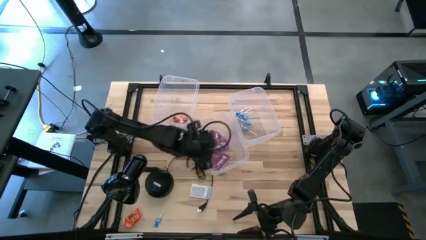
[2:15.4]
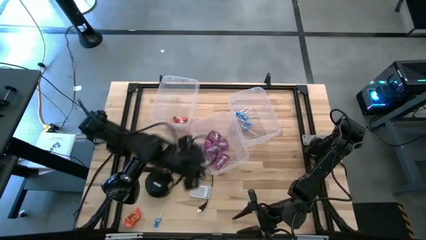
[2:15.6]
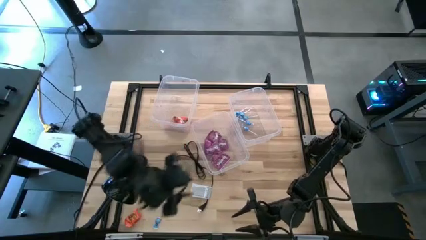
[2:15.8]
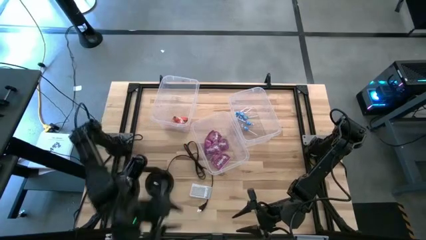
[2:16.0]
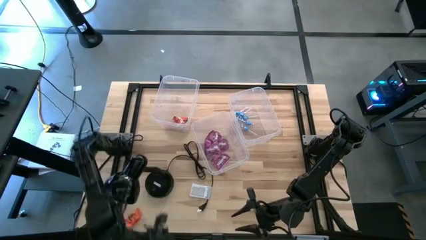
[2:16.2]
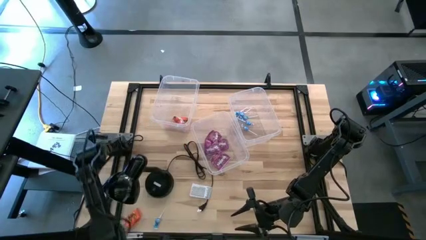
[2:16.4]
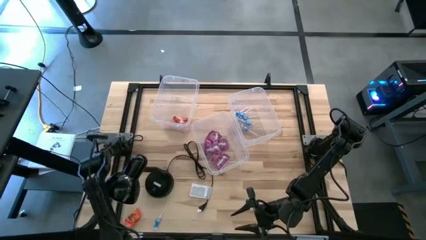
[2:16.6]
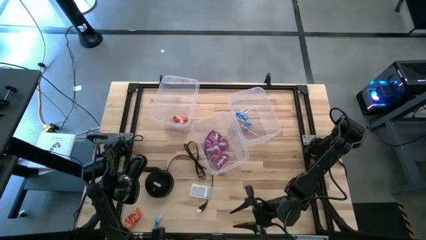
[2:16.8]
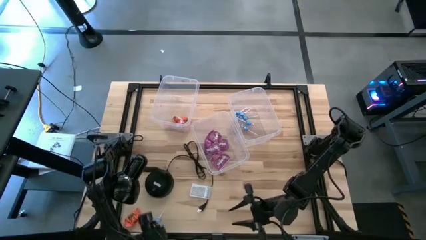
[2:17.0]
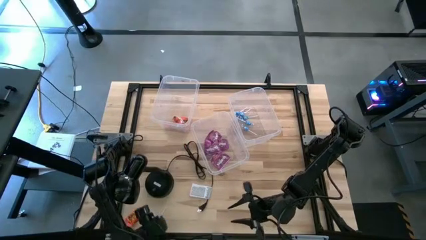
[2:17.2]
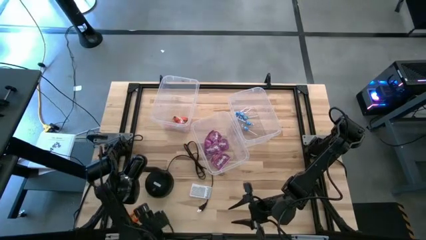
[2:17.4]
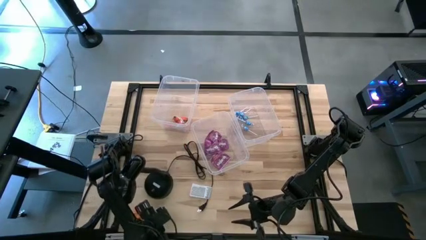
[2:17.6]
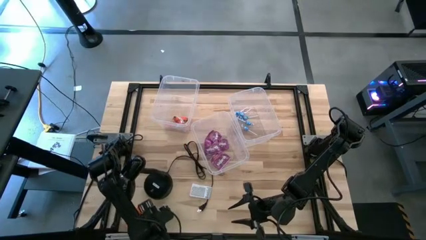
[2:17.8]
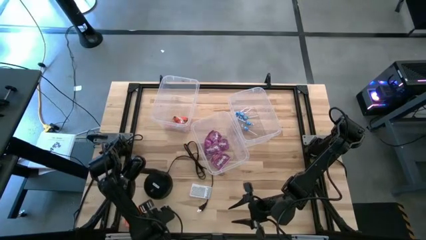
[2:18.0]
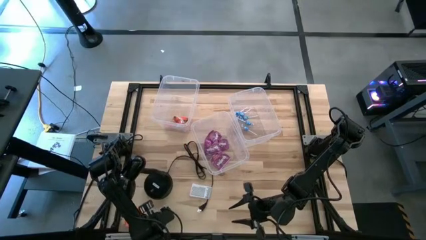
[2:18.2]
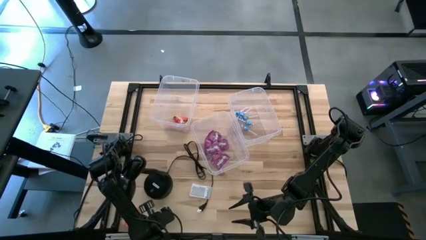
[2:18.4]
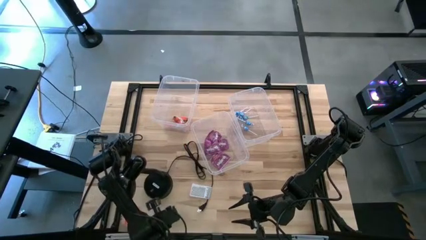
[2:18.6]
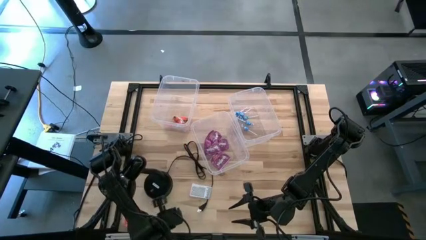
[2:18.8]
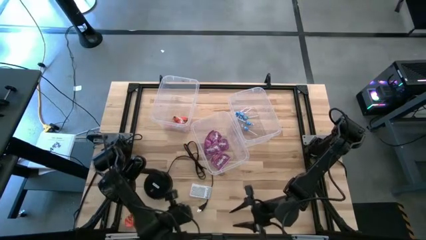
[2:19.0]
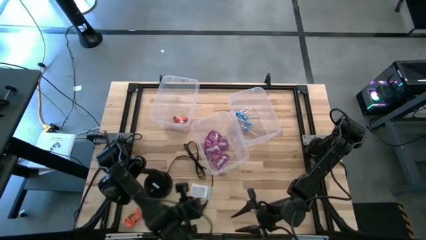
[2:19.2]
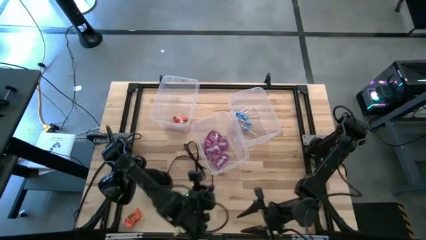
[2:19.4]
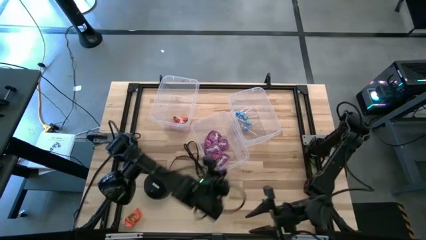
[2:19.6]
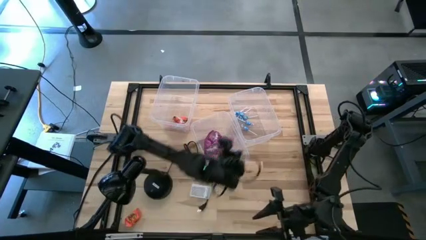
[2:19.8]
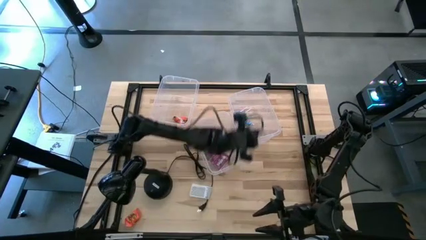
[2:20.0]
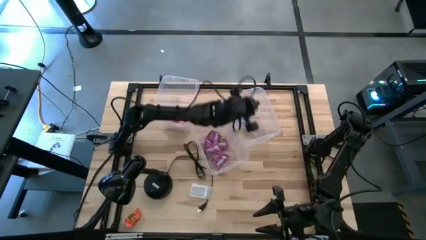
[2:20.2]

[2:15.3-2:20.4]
Task: Sort candy
Put the blue candy into the right transparent bin

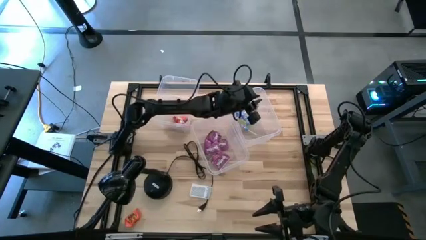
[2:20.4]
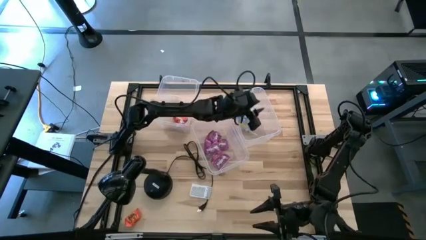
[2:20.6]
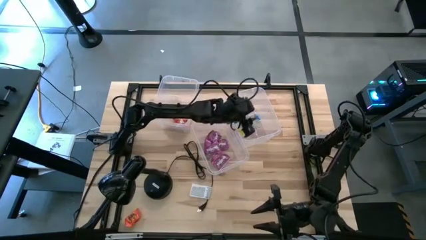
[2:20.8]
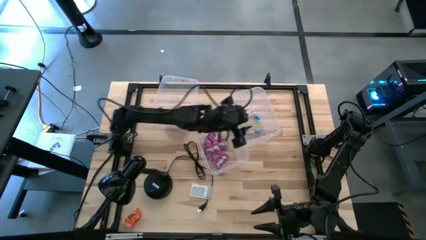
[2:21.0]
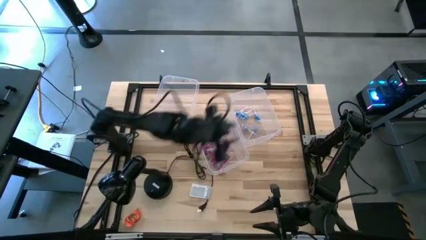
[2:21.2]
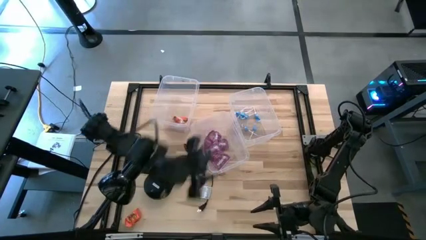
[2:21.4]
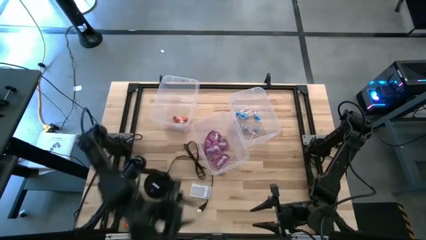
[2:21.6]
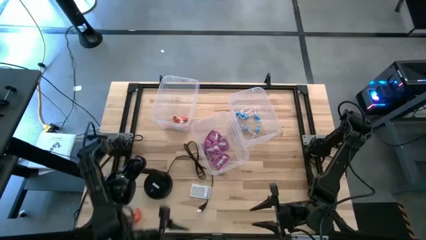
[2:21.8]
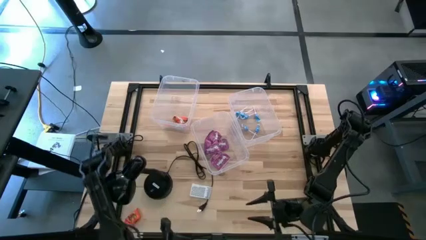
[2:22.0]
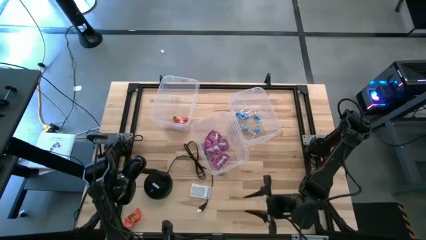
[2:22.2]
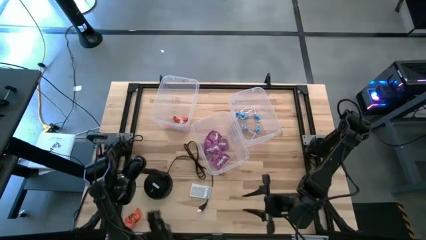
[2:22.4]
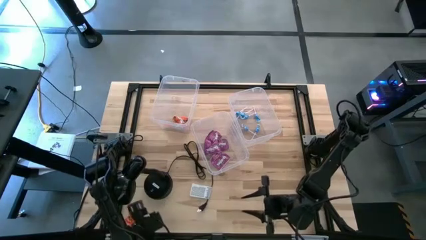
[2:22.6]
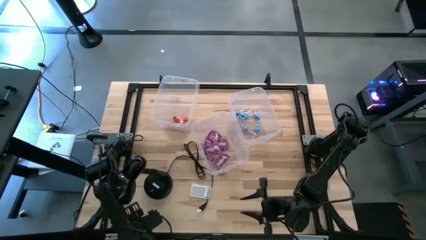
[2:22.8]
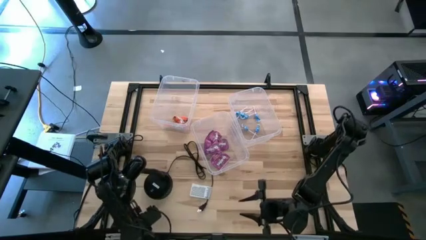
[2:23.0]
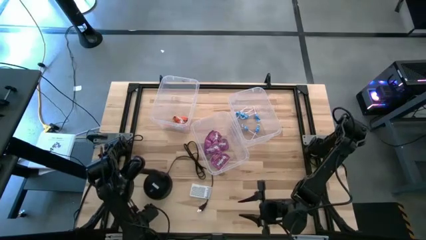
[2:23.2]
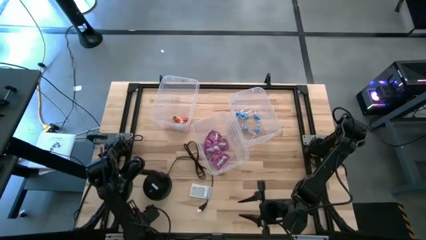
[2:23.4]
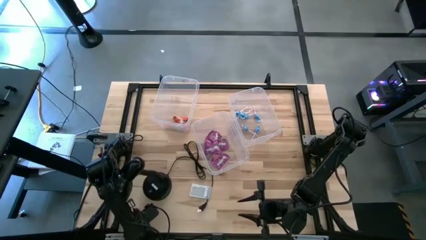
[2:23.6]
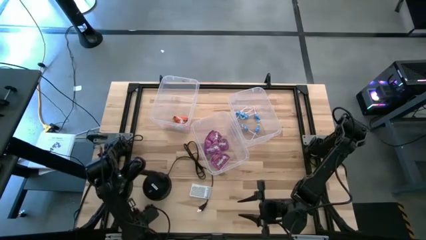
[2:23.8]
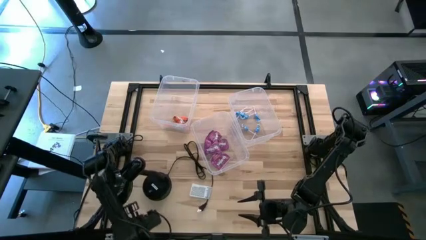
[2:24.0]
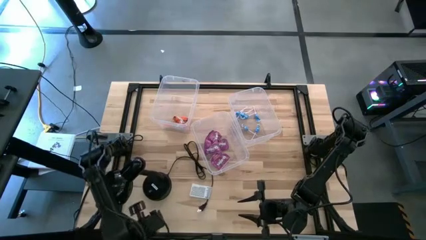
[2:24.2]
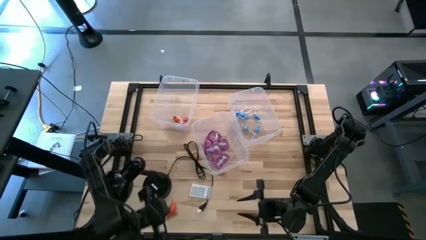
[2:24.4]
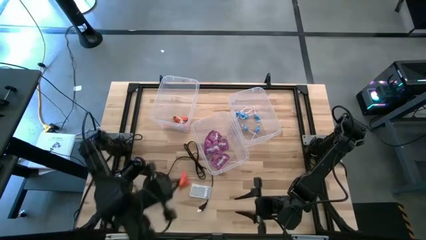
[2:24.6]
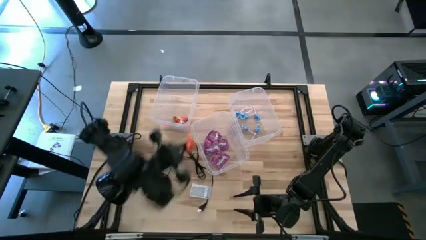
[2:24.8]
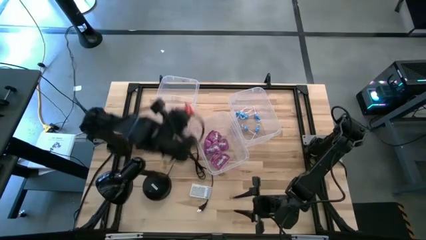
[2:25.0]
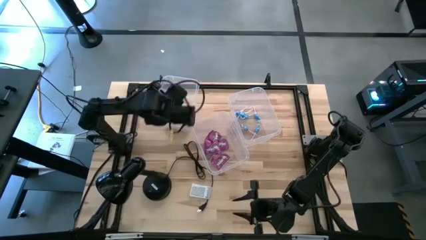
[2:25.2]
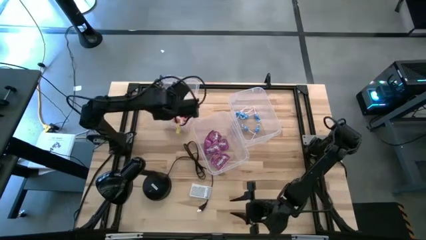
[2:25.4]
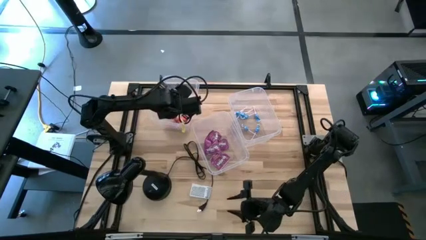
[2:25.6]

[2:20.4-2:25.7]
Put the orange candy into the left transparent bin

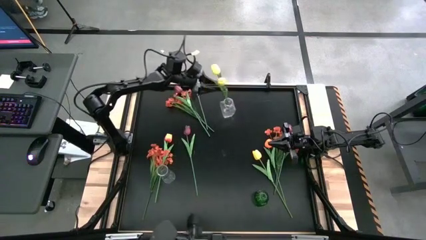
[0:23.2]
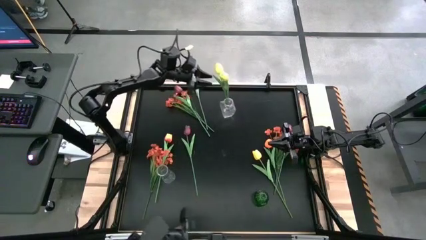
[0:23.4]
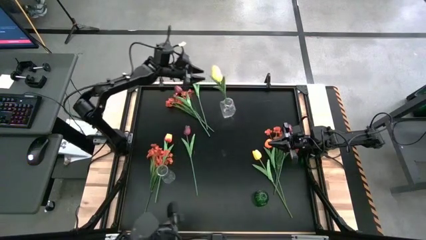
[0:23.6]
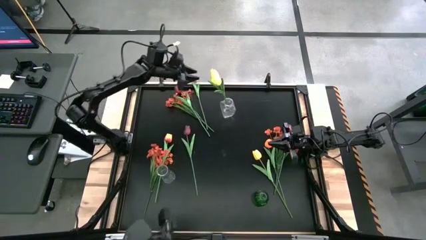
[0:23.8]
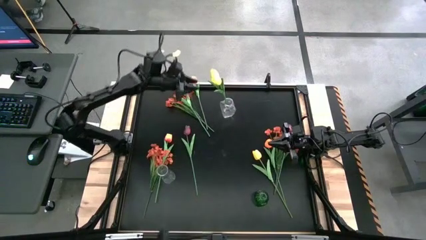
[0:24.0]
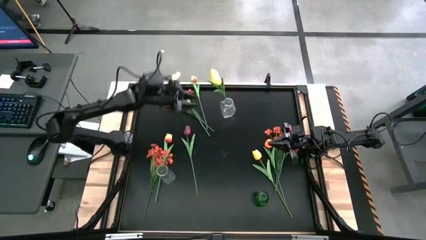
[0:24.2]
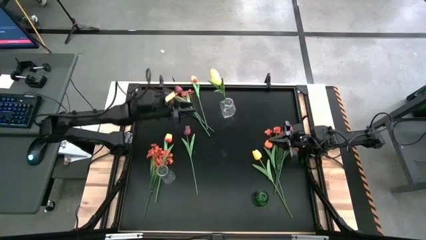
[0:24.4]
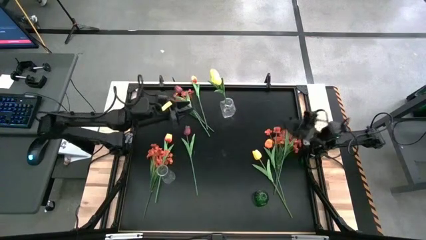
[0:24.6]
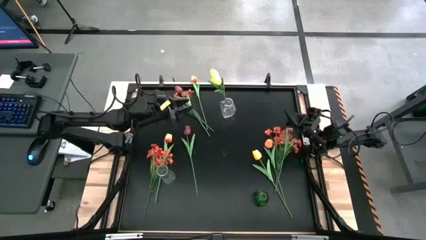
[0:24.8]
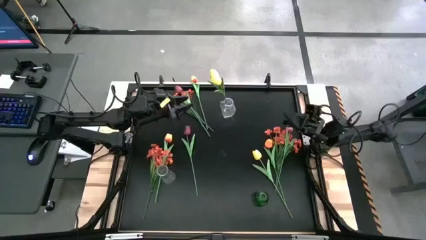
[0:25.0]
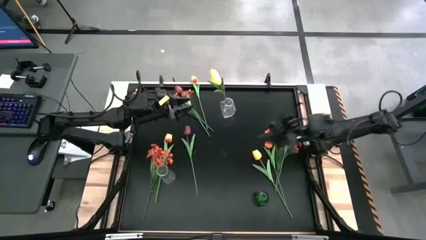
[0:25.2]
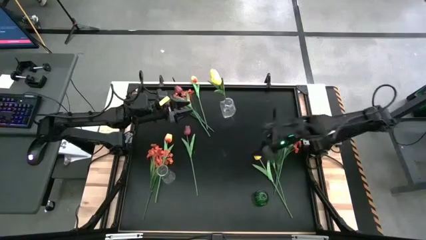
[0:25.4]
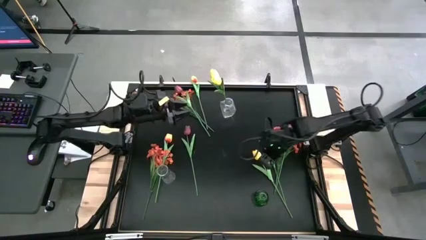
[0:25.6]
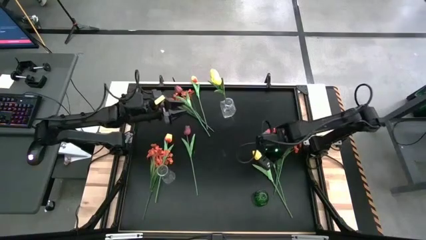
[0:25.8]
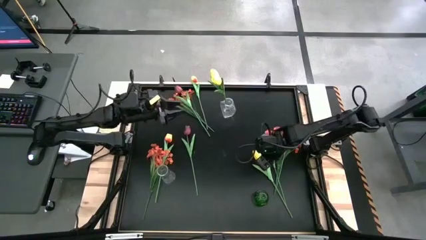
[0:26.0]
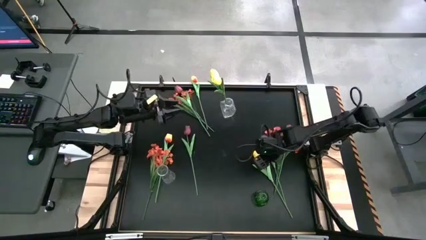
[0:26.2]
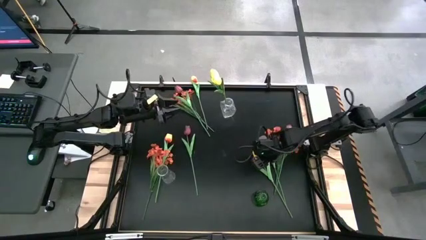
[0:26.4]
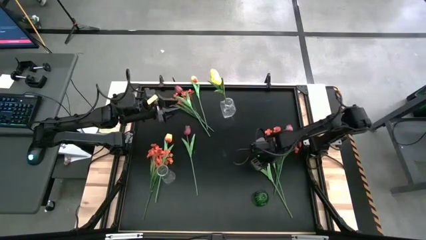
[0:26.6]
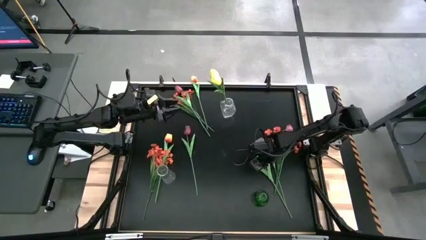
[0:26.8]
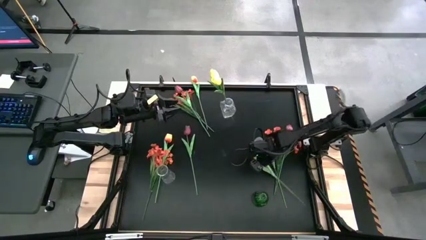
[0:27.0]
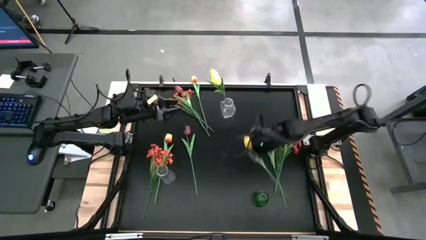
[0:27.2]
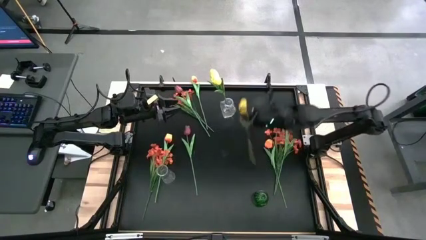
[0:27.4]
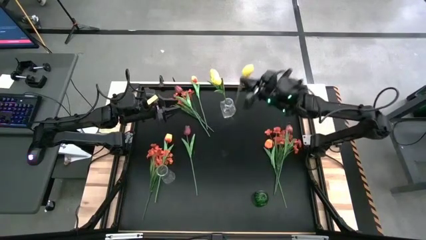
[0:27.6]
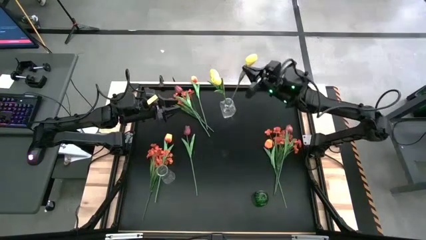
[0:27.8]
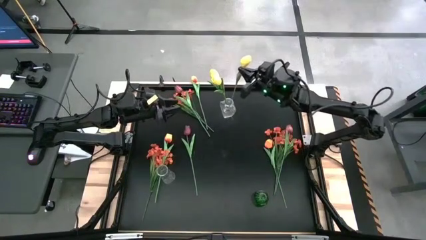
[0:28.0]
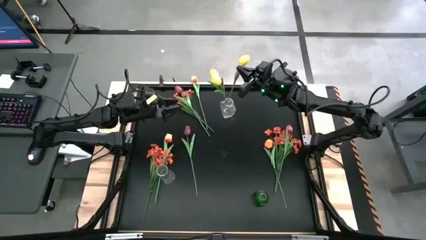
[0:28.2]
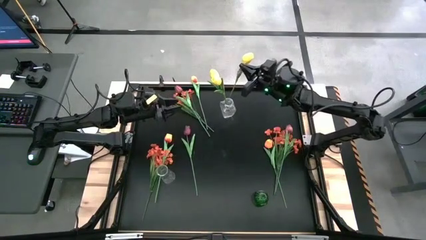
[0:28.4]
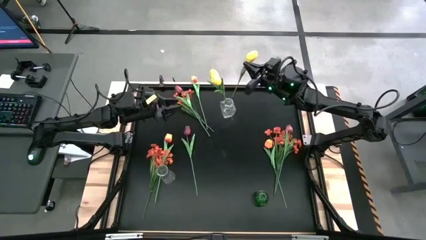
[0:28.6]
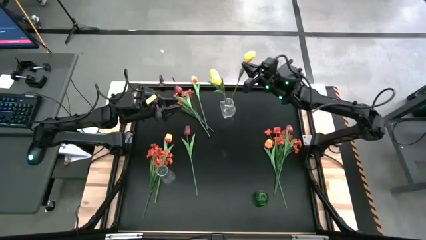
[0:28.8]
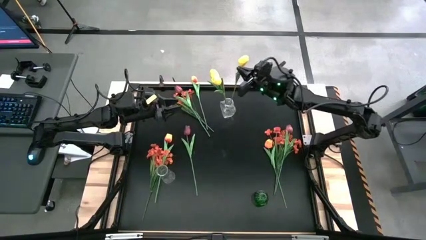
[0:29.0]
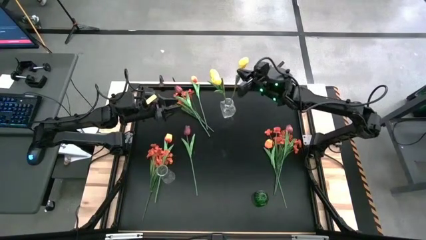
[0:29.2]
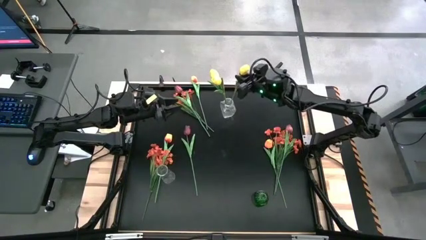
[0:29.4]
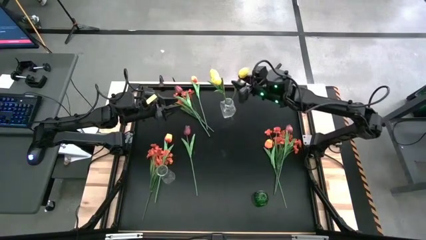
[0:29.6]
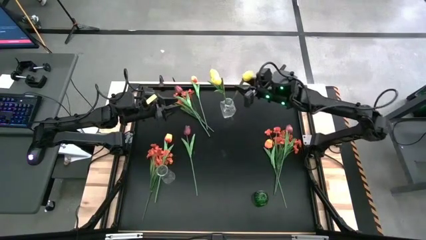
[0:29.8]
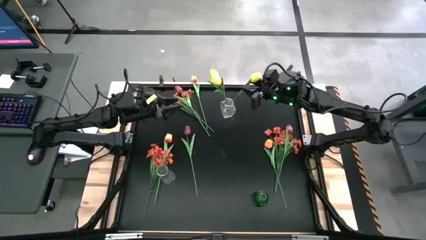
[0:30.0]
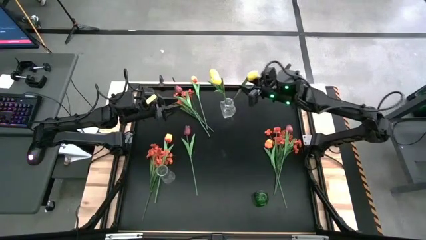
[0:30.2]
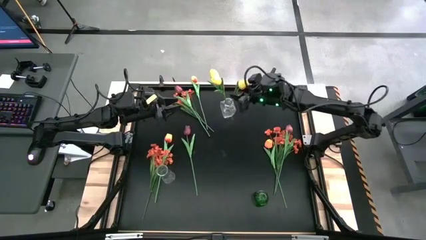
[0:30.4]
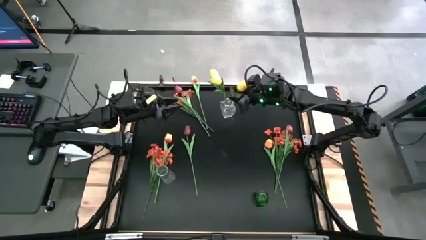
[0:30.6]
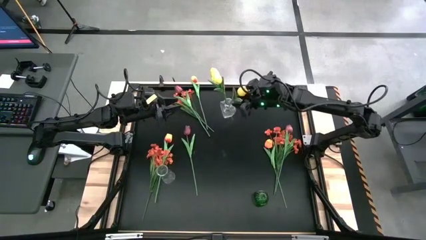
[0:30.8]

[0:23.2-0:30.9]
Task: Sort flowers into vase by color
Put the yellow tulip into the top transparent vase
